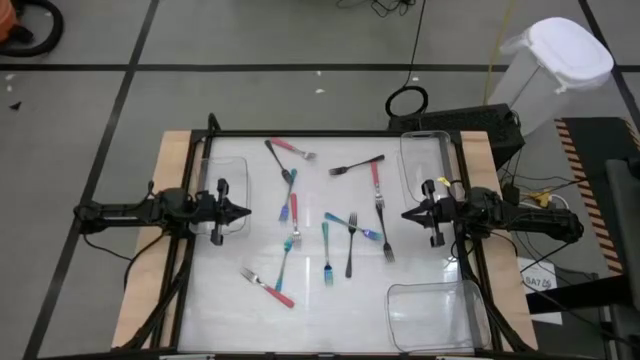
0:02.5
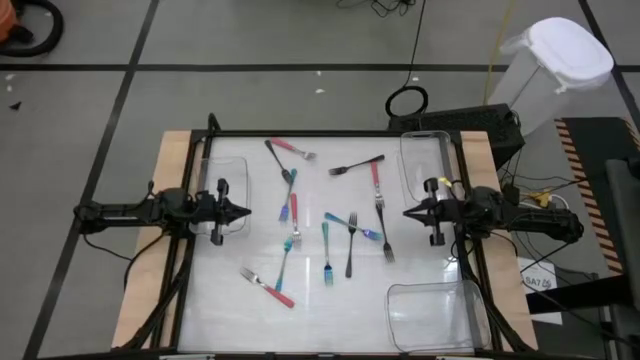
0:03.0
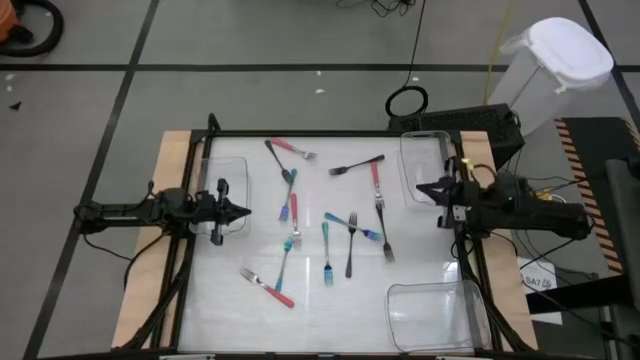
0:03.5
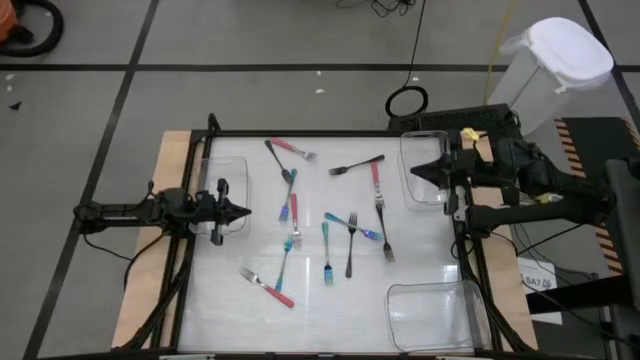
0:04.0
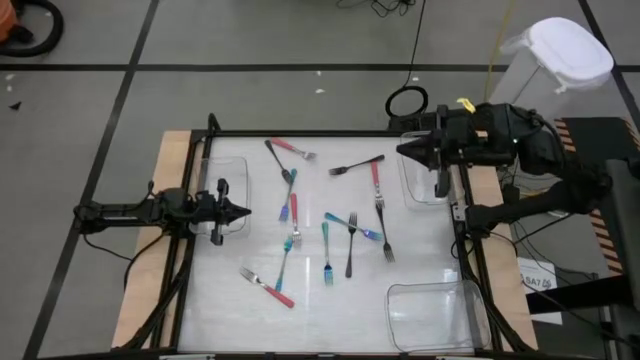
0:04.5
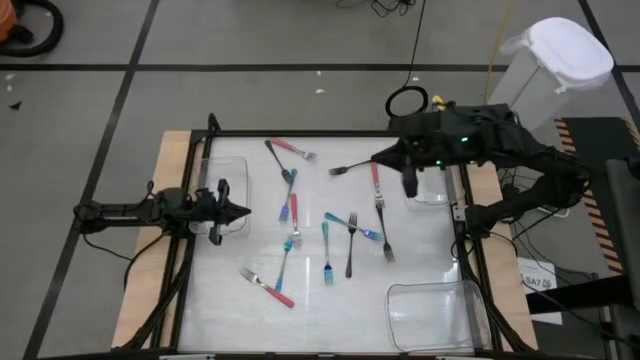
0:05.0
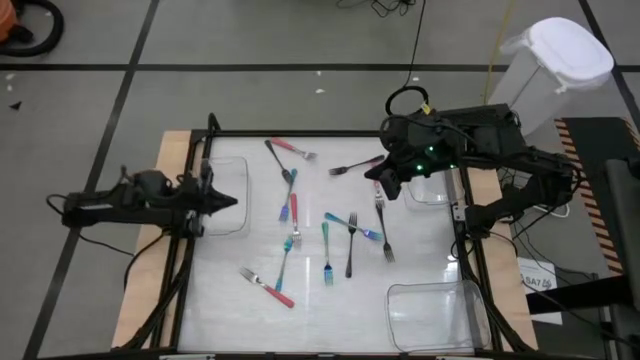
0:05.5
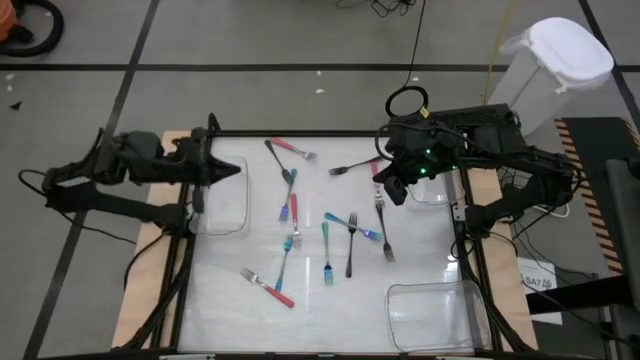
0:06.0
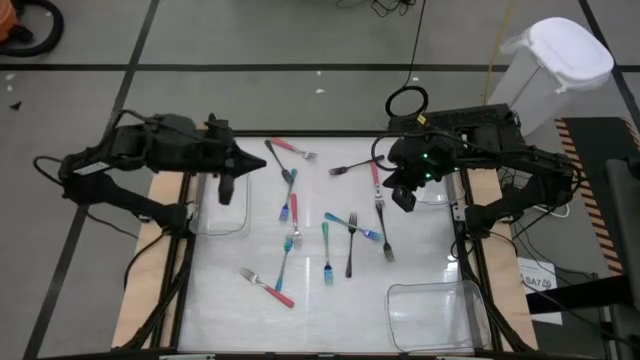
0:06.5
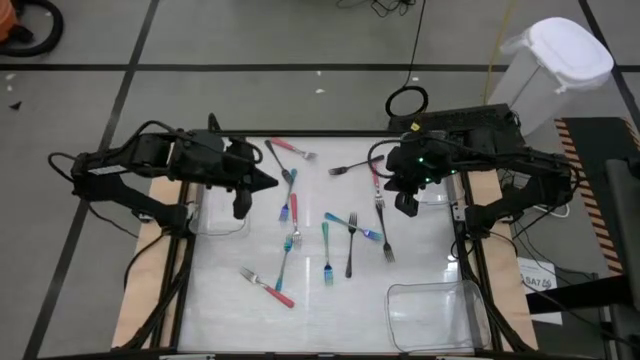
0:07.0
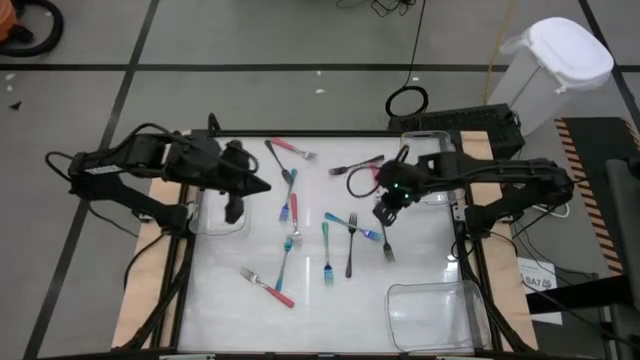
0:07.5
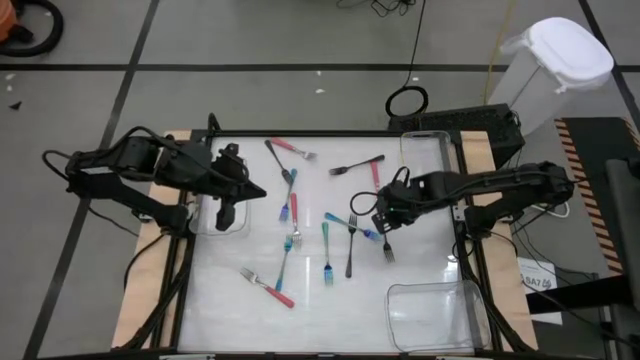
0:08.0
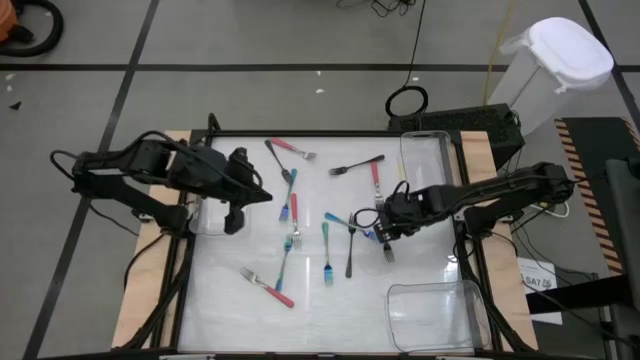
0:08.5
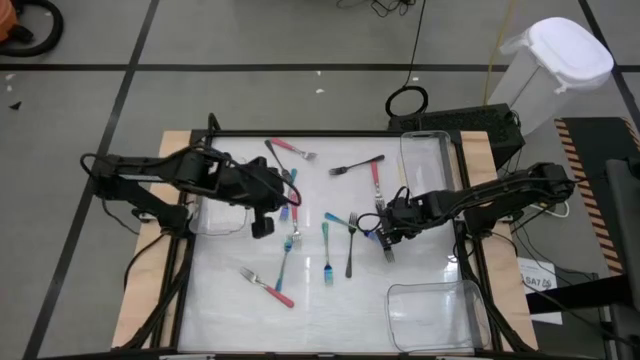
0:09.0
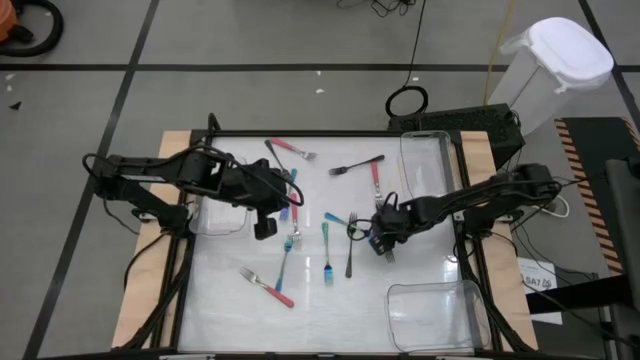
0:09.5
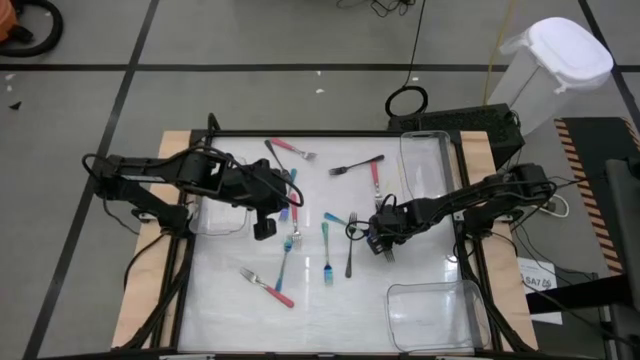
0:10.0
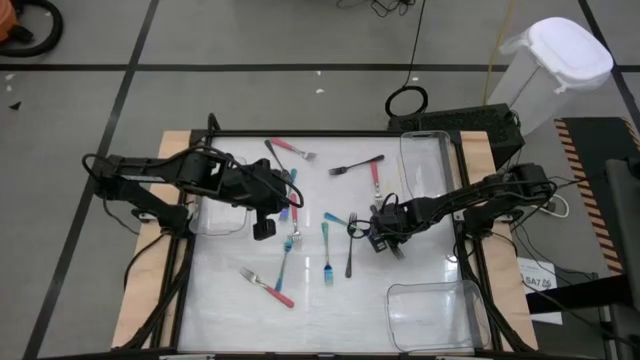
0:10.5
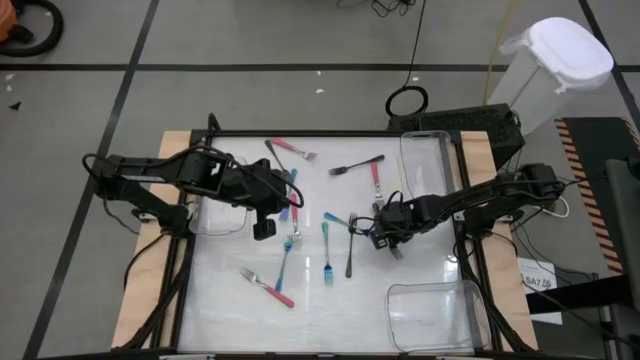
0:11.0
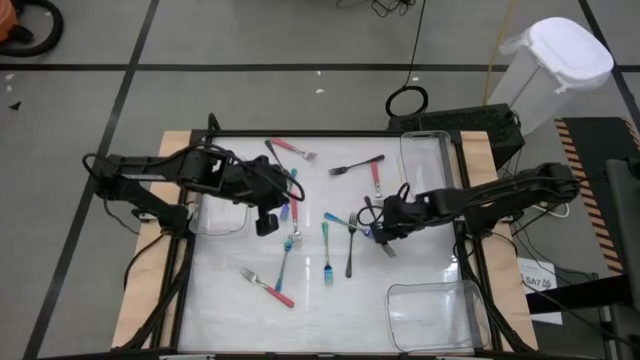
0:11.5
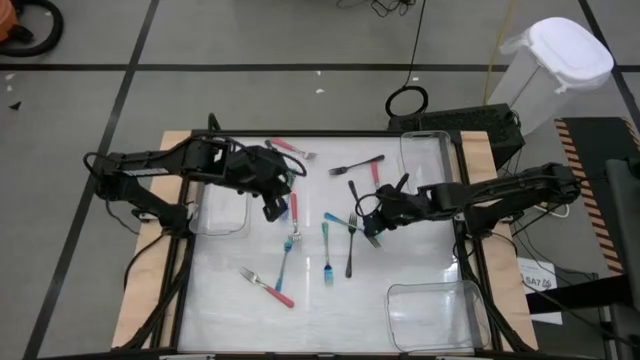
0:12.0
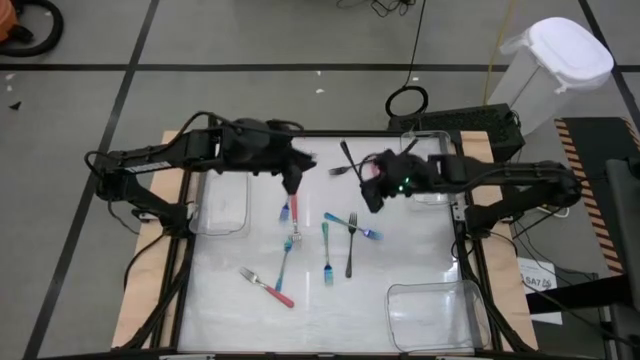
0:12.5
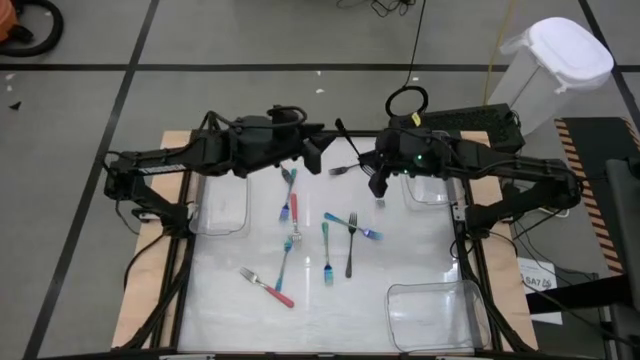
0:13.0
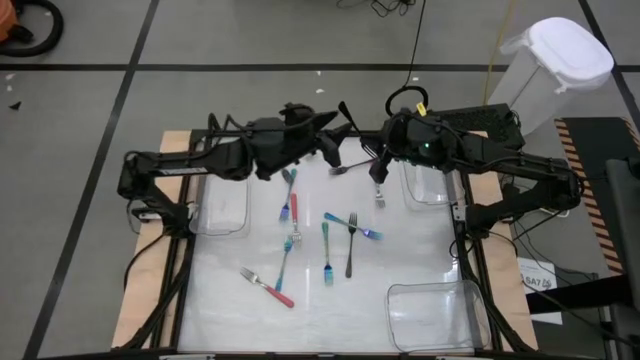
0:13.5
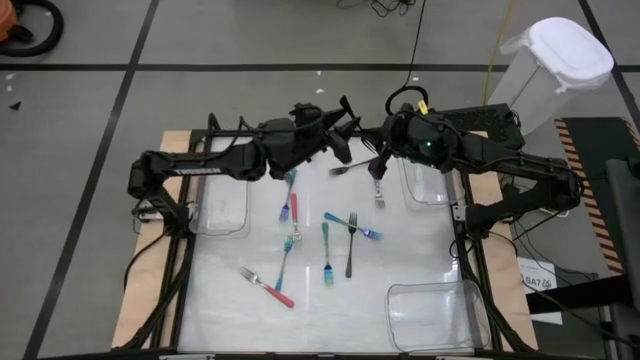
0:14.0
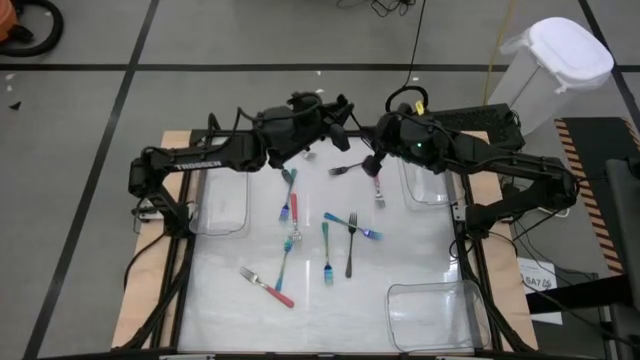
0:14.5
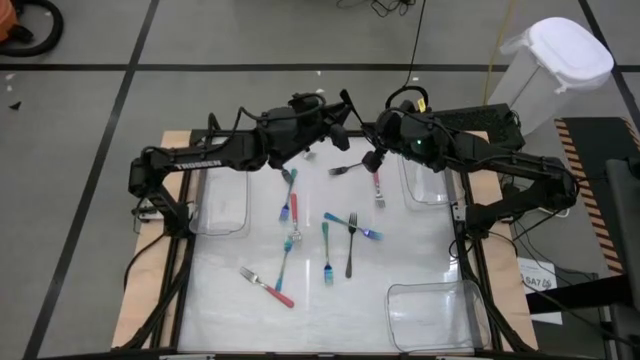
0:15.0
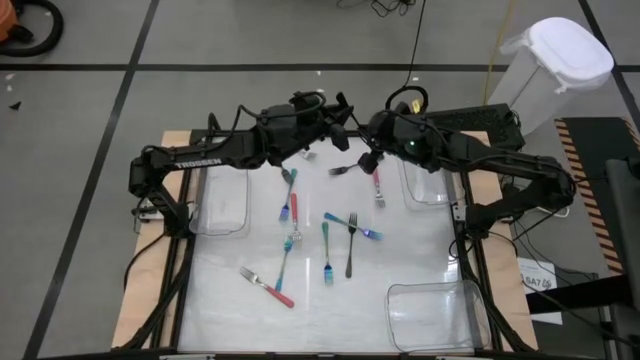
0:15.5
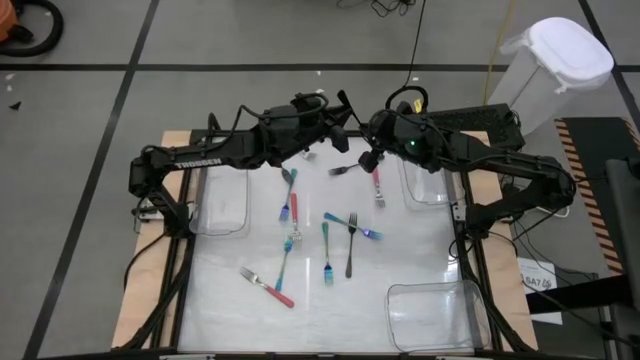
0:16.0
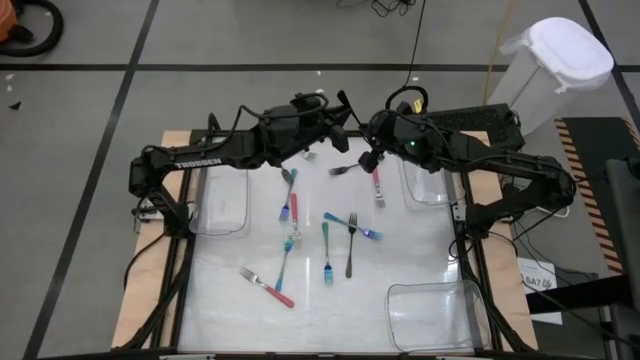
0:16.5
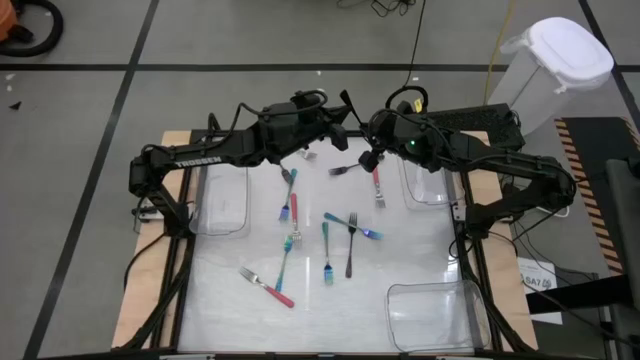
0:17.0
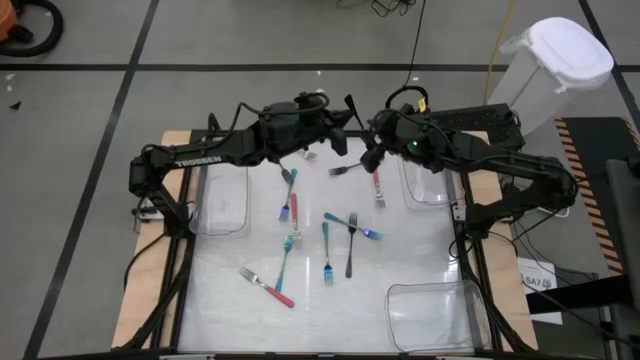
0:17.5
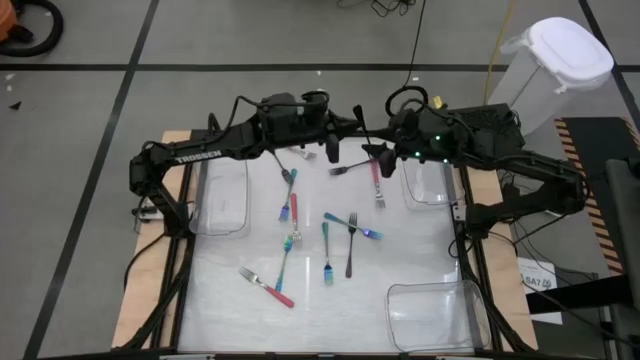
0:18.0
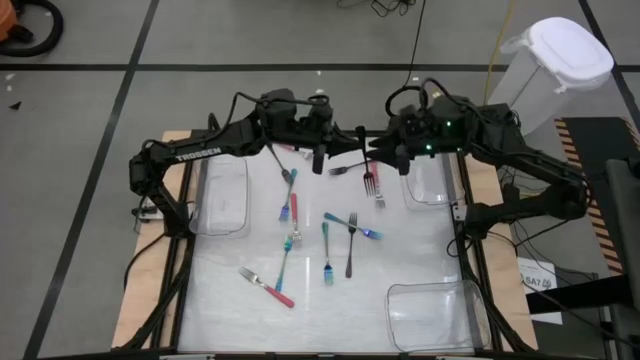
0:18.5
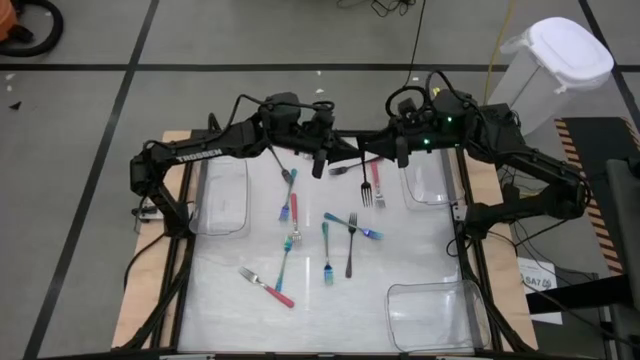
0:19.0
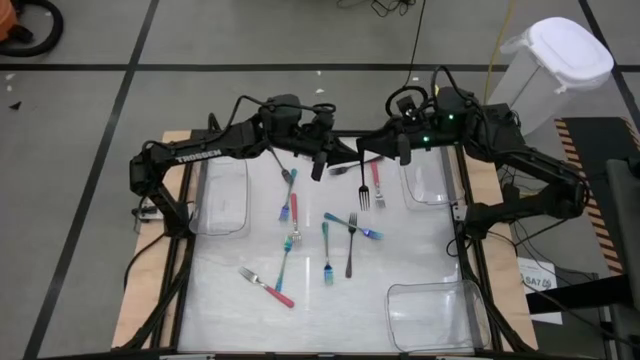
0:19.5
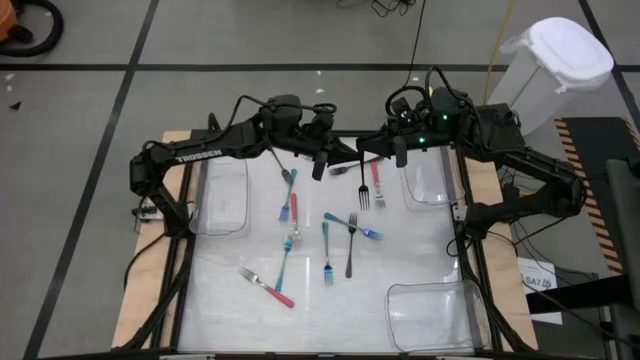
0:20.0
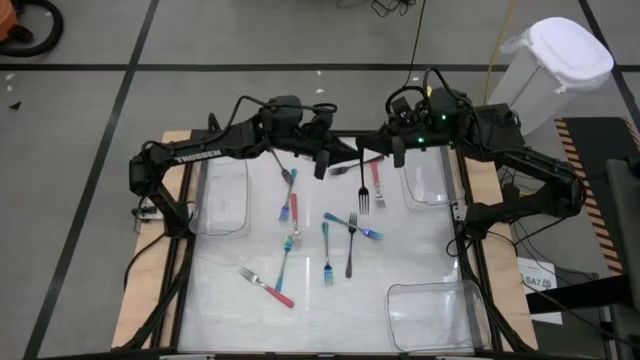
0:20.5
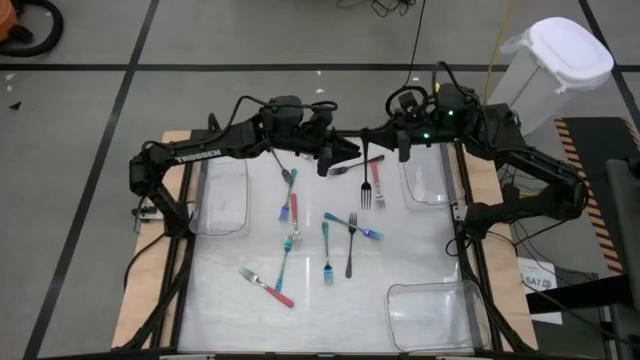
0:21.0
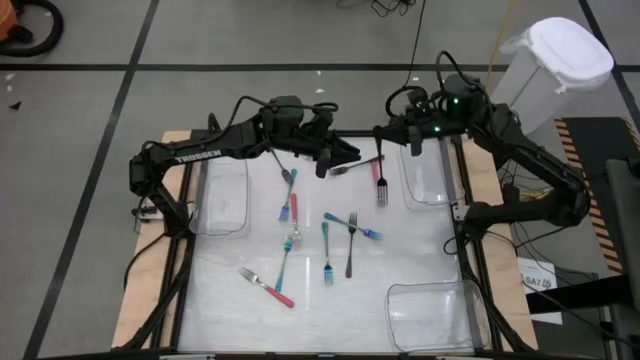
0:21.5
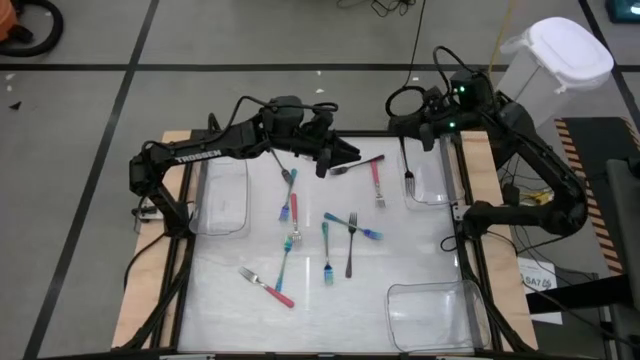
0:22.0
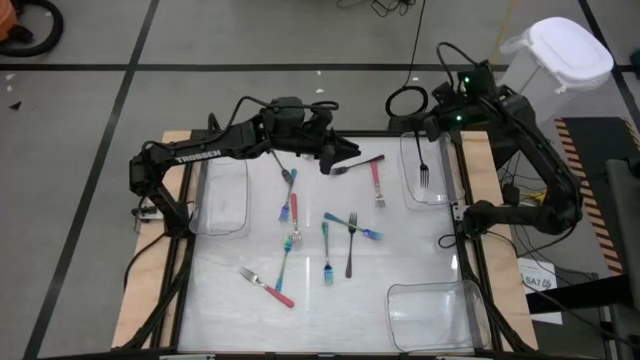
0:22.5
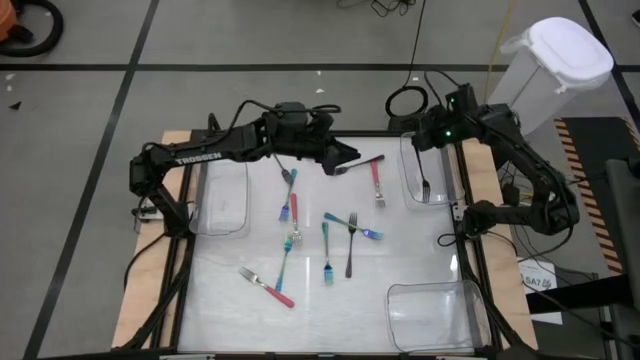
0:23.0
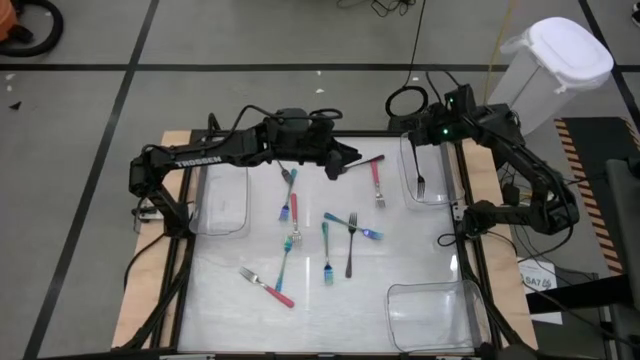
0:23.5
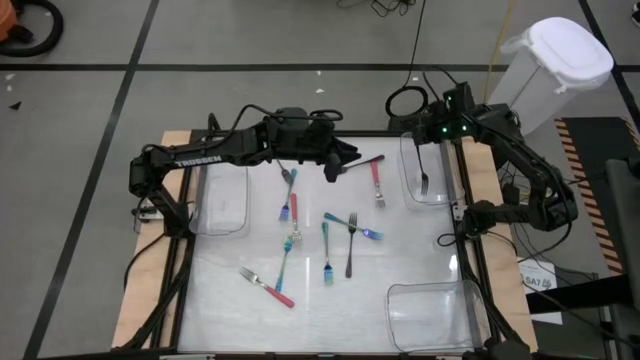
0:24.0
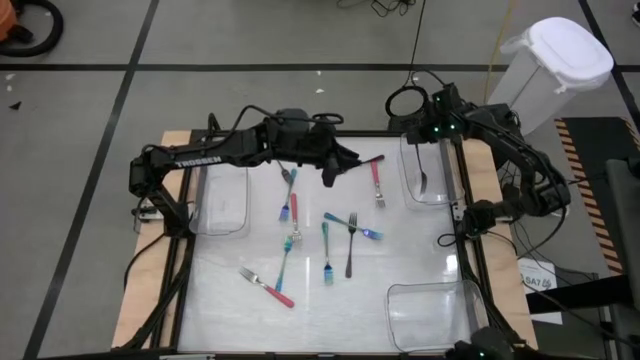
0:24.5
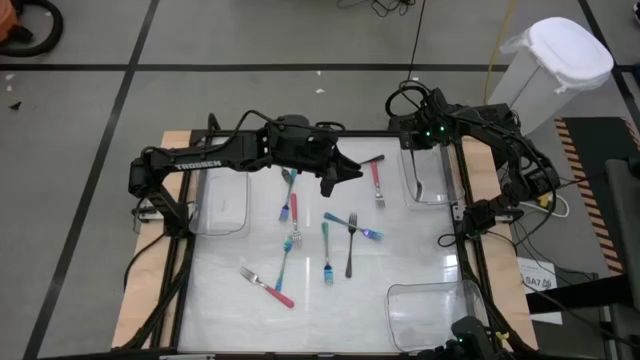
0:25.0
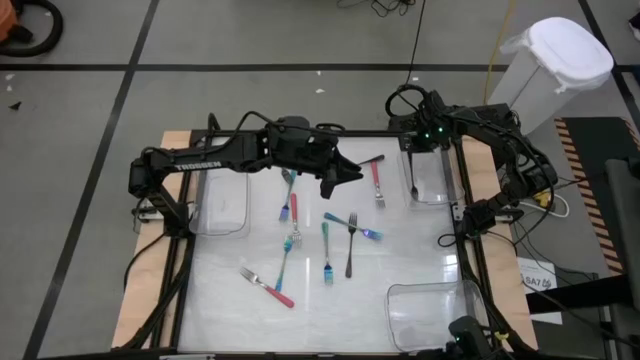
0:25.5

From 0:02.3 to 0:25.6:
Task: Sort silverware by color (type)
Put the black fork into the top right transparent bin
